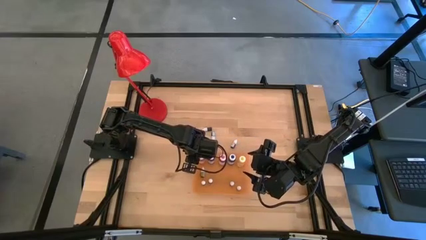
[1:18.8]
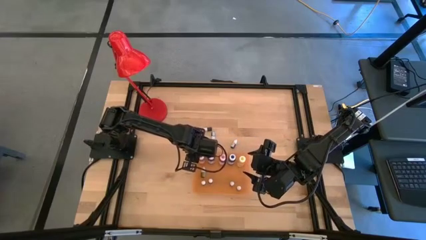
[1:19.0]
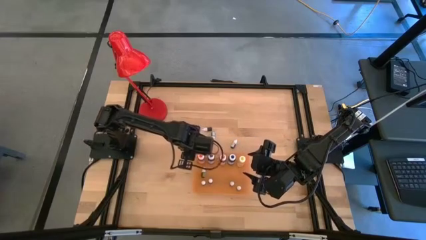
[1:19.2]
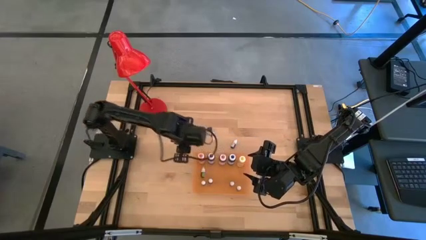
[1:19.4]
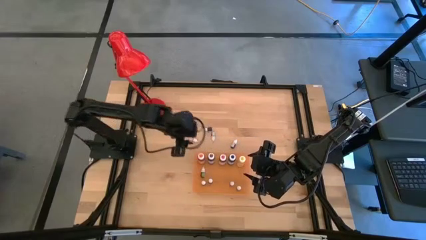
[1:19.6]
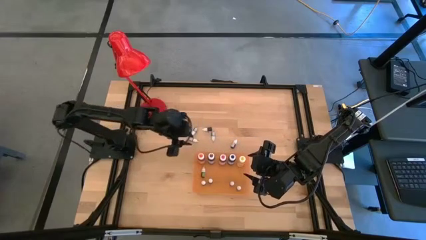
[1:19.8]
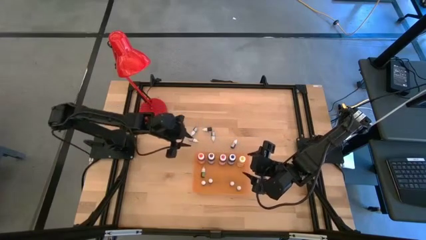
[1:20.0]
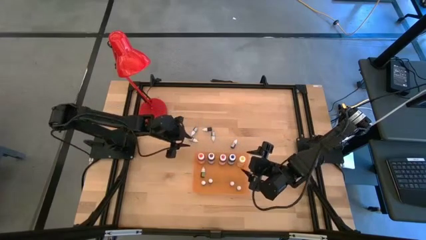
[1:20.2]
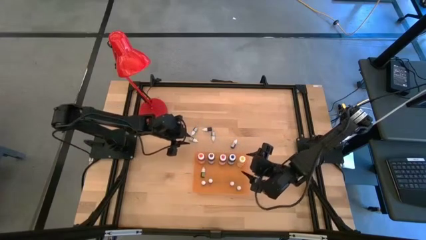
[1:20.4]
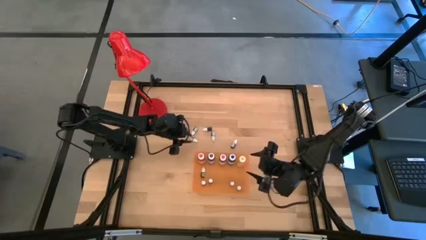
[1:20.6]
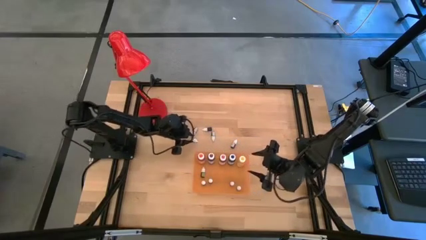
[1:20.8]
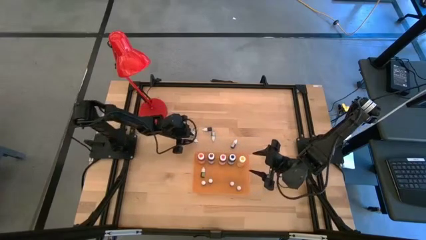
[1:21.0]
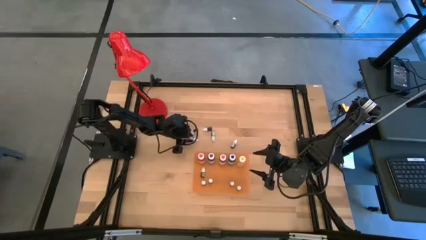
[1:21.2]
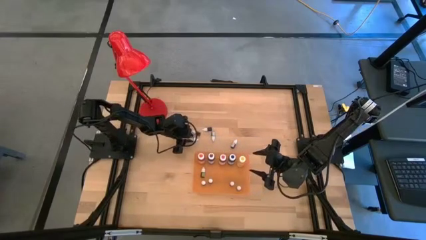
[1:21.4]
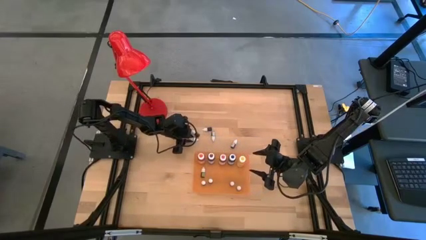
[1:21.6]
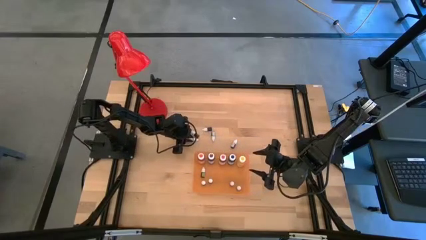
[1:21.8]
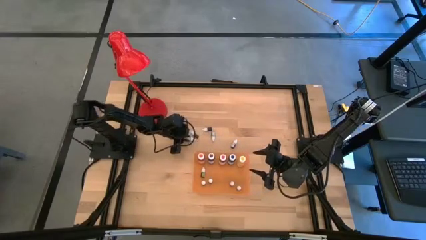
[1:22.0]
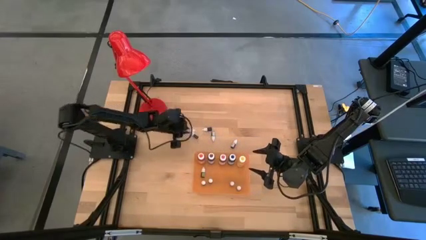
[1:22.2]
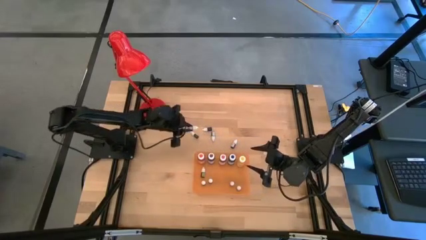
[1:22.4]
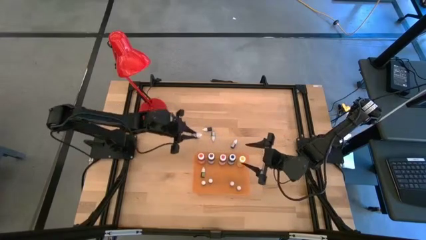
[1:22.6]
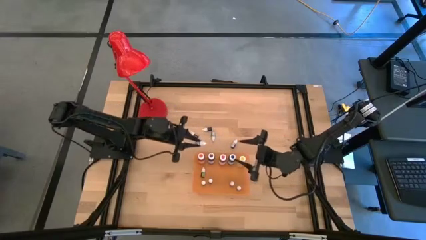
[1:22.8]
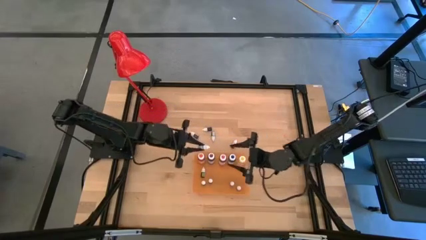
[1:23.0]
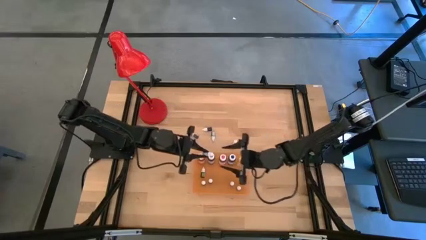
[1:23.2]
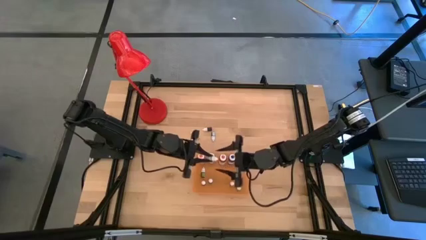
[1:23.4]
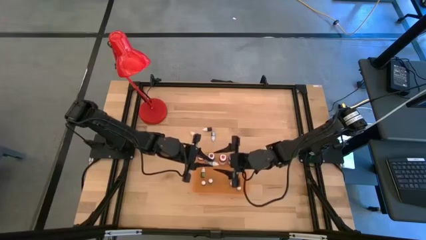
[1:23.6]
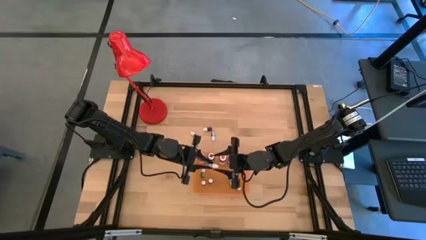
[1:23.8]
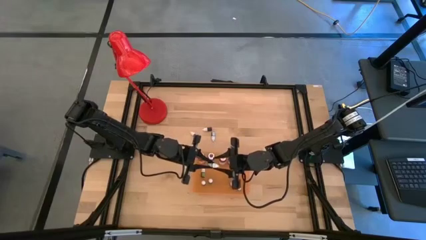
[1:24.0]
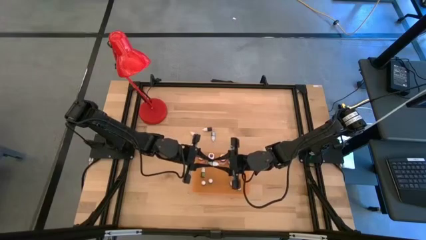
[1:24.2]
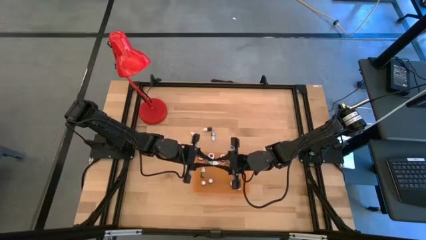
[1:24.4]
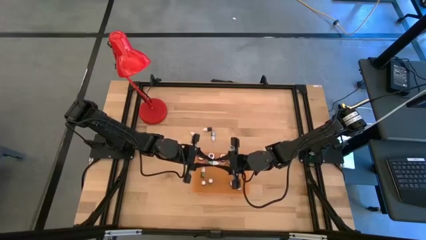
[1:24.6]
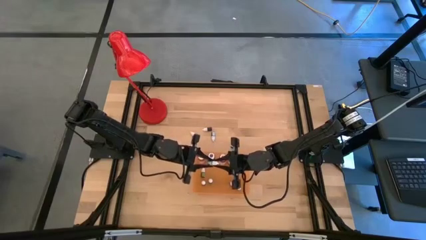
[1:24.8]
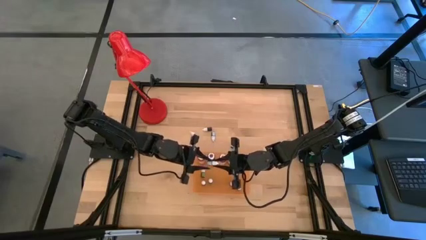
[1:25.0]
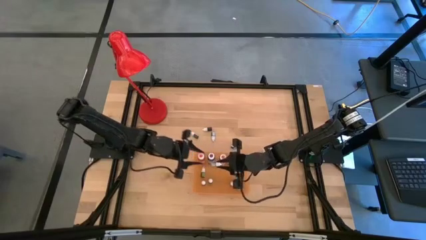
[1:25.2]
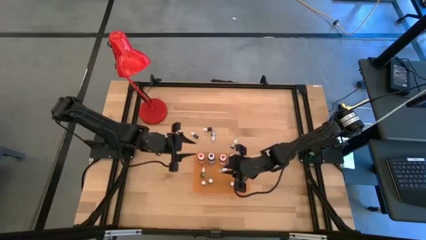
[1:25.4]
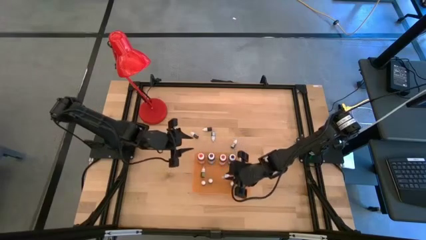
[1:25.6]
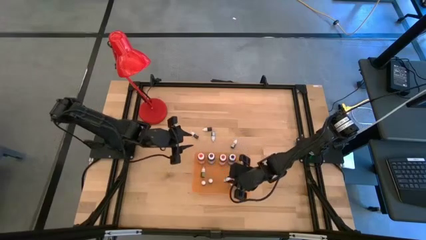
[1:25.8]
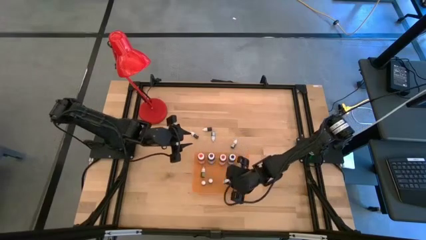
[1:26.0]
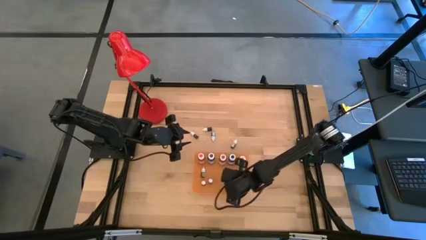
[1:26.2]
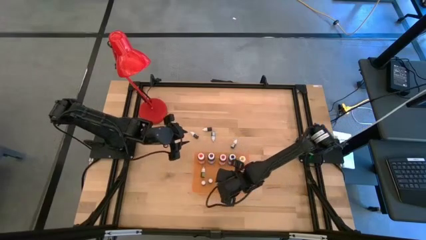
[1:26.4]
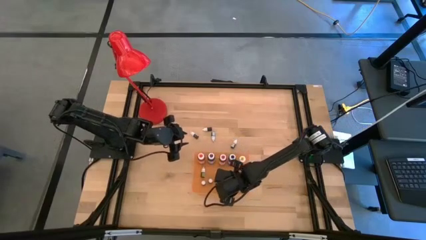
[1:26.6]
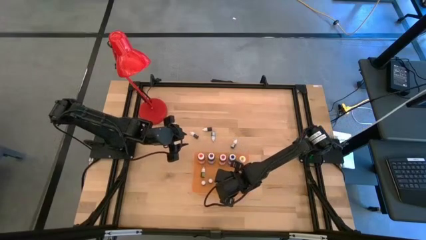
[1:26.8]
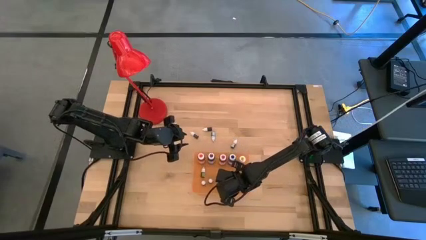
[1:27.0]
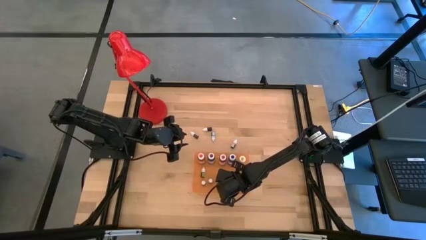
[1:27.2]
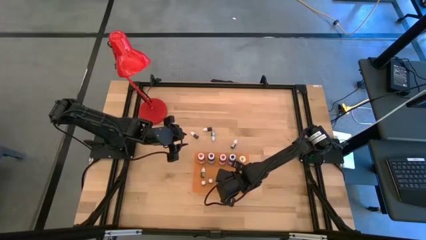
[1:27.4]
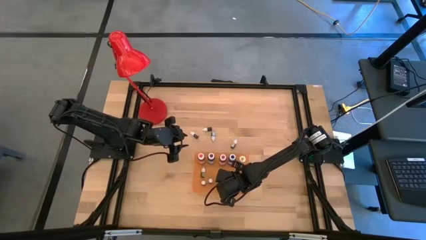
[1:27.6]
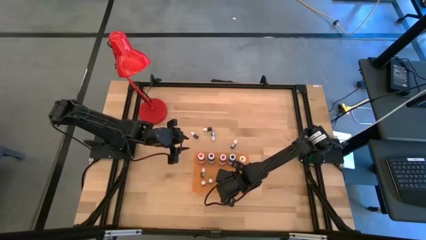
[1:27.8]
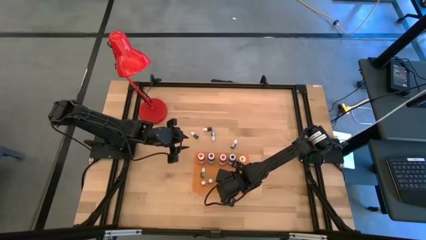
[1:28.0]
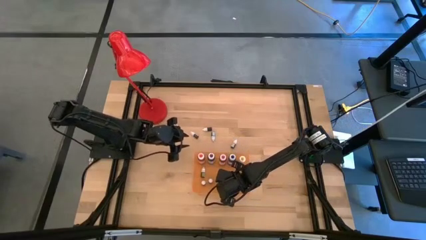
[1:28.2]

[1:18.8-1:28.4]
Task: Pick & Place food coloring
Put the small green food coloring bottle into the orange bin

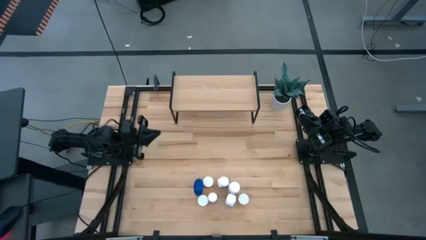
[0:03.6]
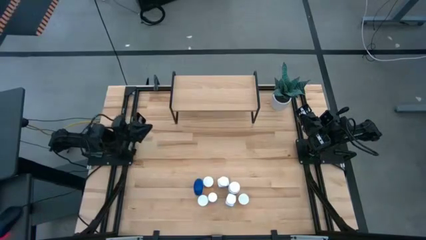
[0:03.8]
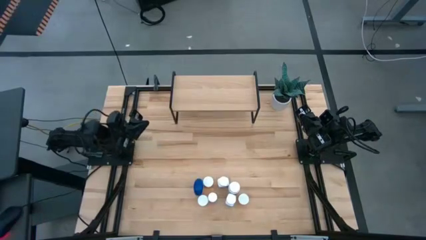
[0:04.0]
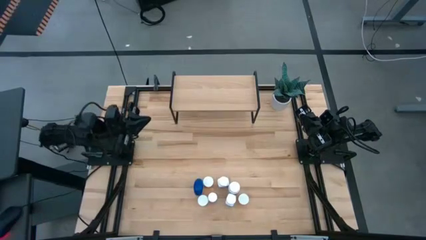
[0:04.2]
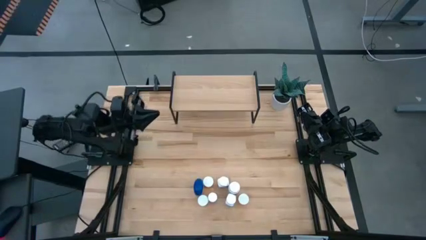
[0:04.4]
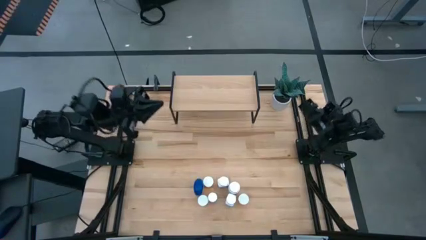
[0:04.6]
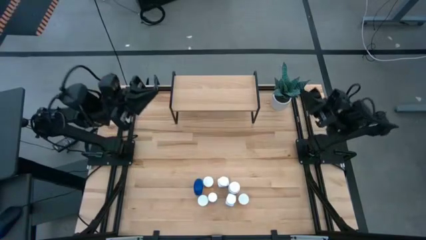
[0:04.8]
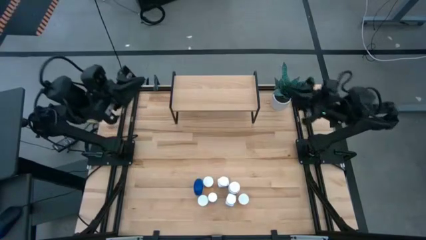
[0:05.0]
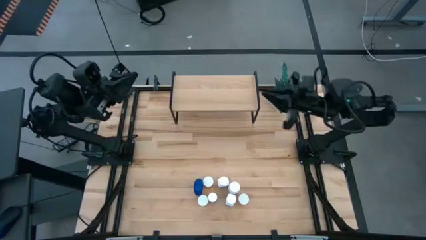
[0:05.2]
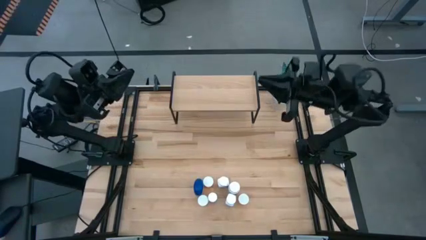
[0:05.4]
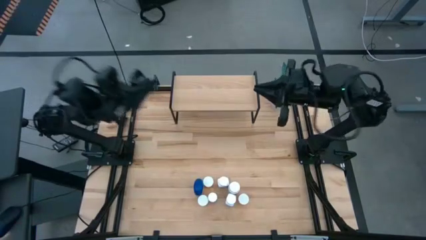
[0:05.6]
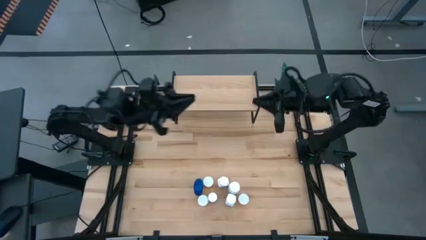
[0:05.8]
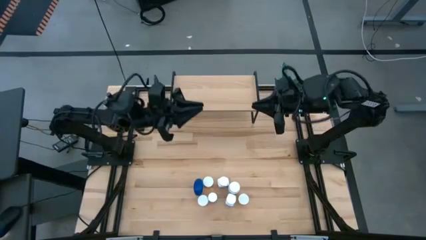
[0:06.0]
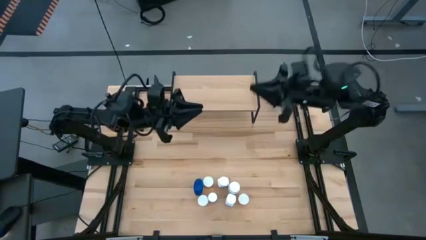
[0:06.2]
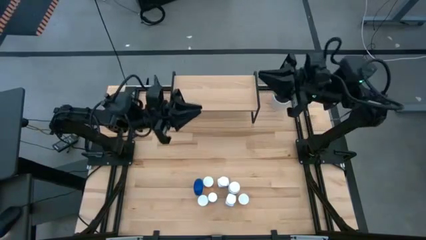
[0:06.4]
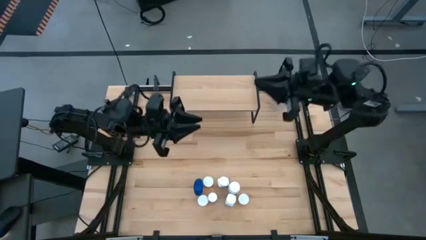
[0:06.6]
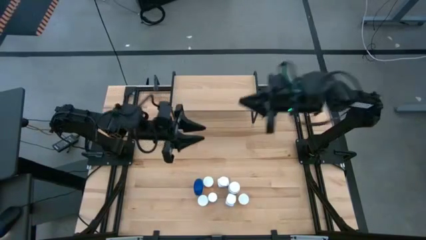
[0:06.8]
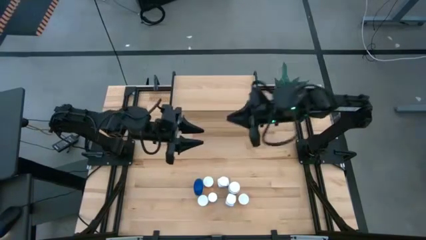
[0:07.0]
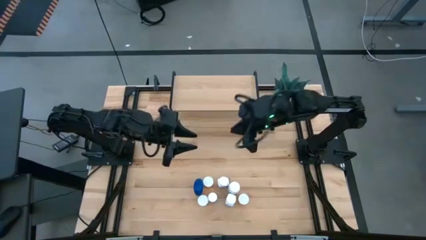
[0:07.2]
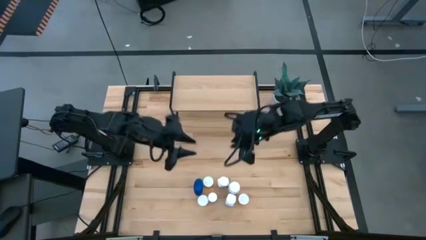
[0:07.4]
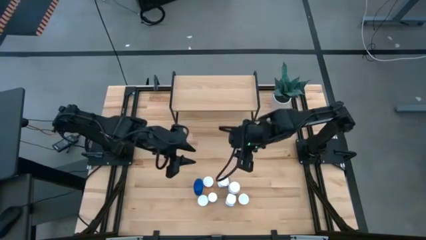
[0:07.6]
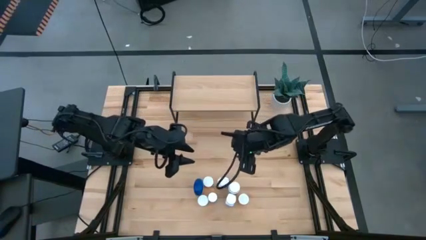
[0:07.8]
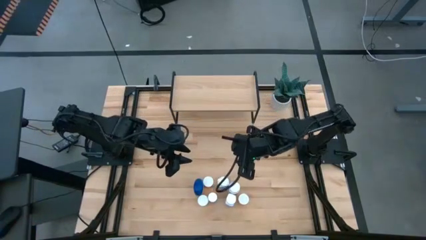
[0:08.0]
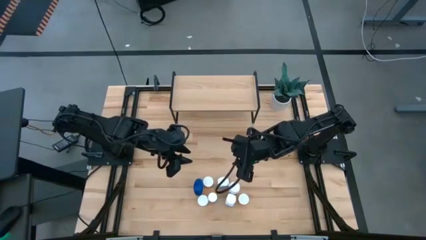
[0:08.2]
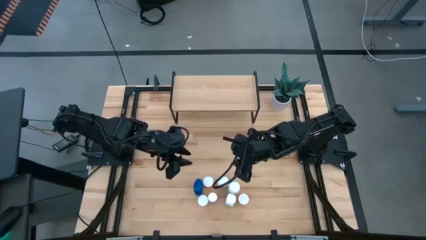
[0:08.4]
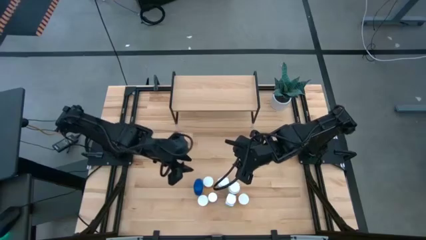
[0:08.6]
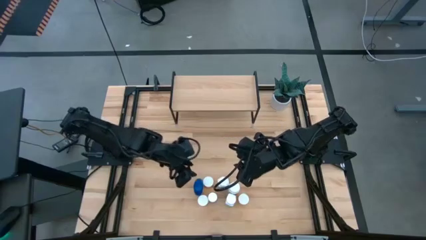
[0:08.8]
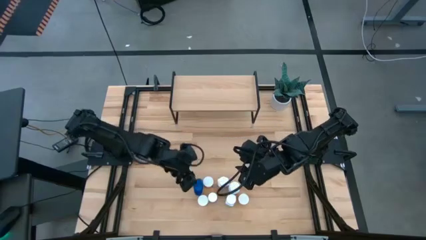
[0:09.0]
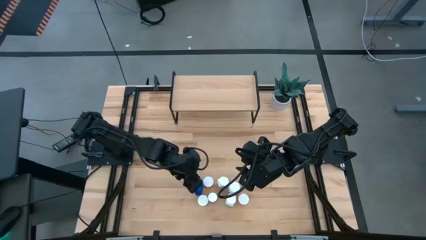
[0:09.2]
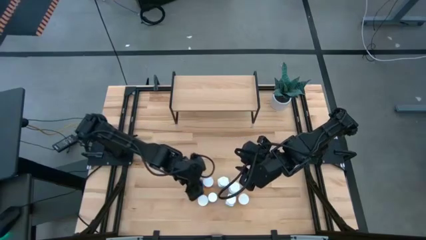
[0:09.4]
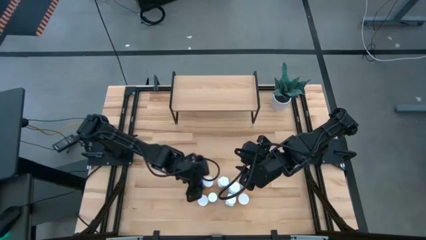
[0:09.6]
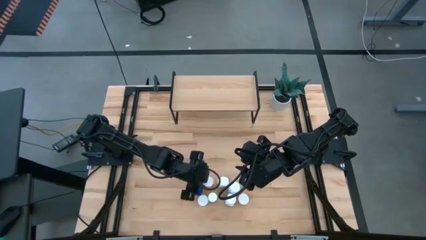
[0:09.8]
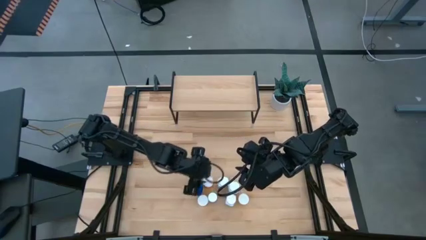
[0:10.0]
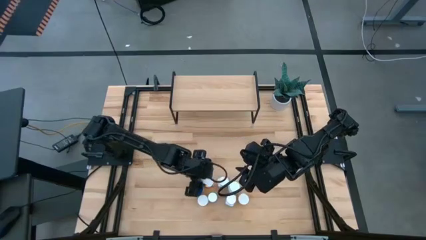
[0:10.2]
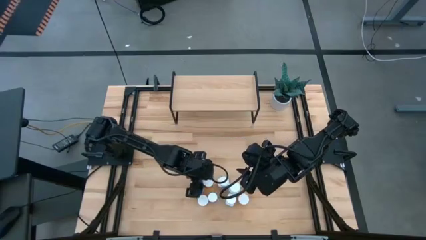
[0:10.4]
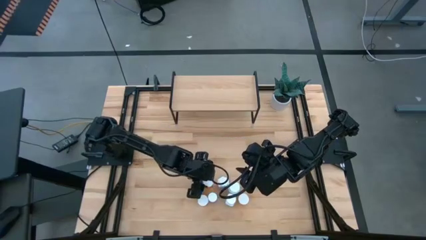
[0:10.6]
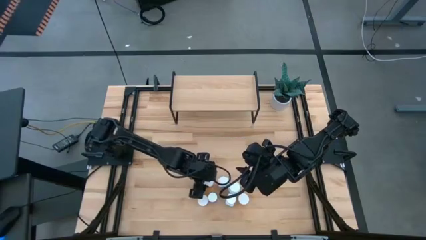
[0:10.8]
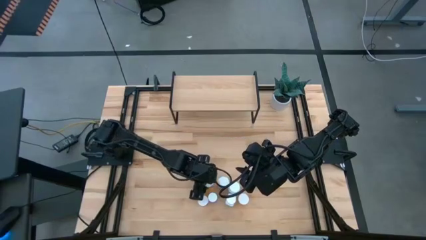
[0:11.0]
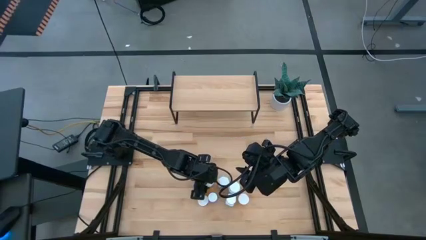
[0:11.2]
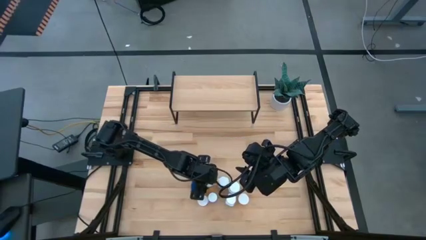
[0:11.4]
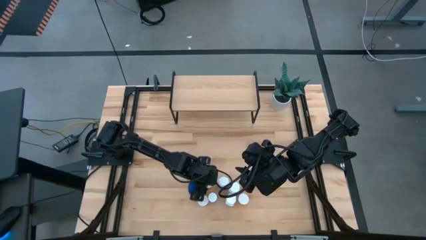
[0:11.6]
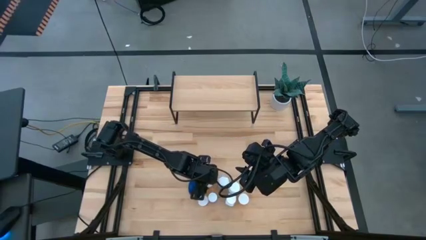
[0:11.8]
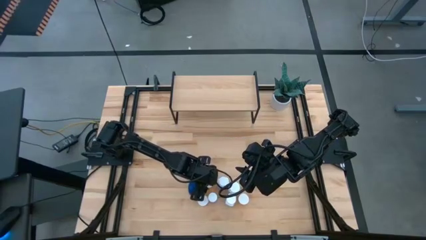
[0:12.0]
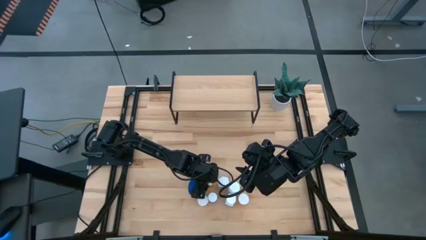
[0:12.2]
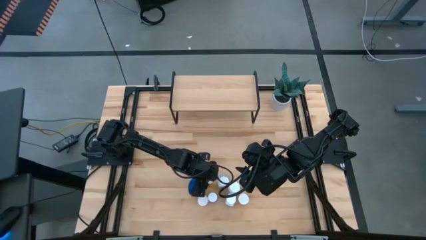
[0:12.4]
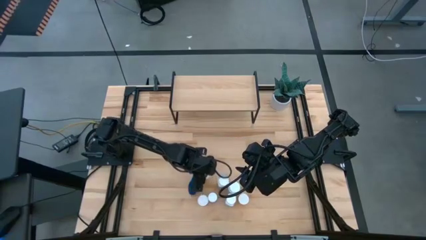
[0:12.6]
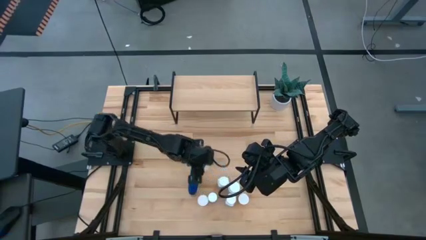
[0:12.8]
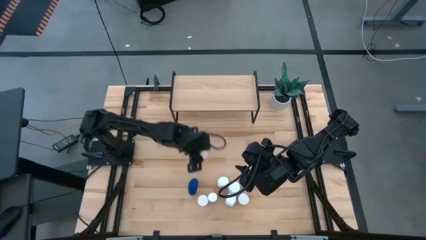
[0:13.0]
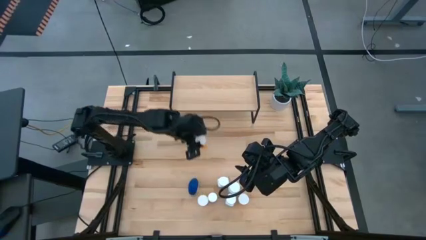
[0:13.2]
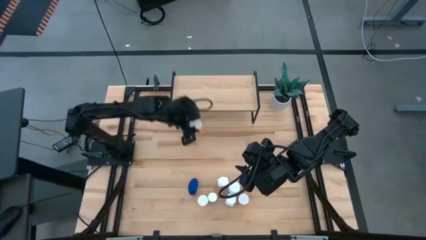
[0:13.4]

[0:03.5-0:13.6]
Task: Pick and place medicine bottles onto shelf by color
Put the top orange bottle on the shelf
